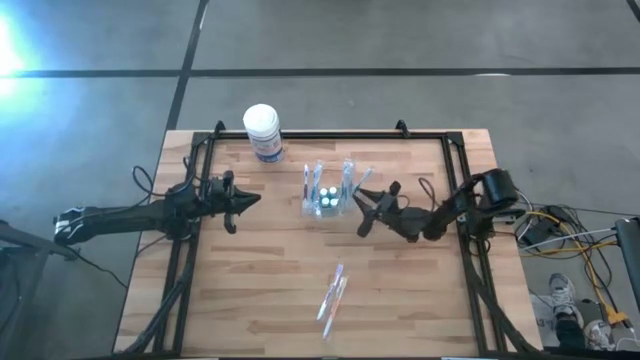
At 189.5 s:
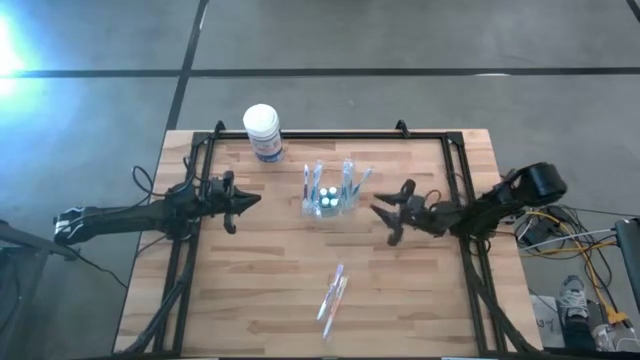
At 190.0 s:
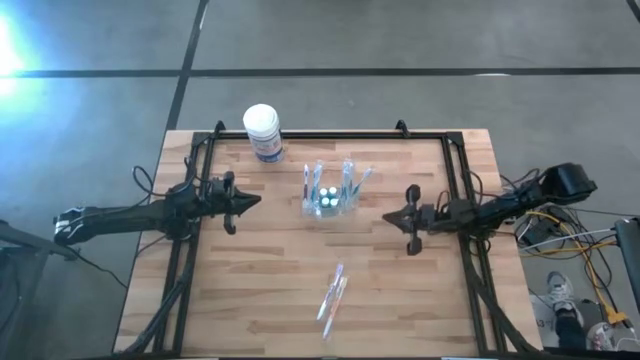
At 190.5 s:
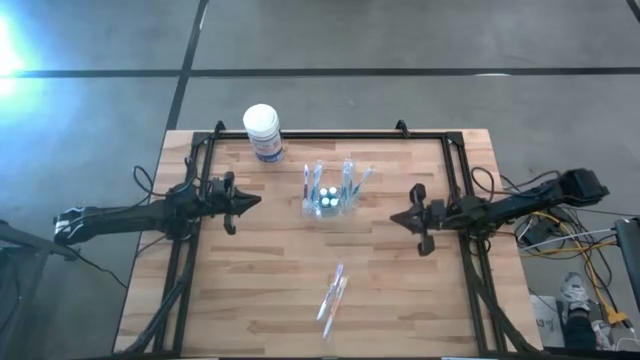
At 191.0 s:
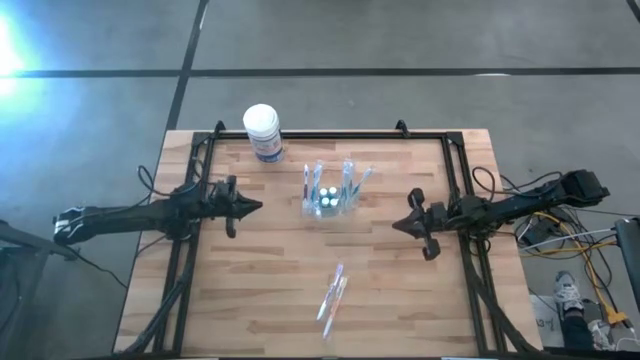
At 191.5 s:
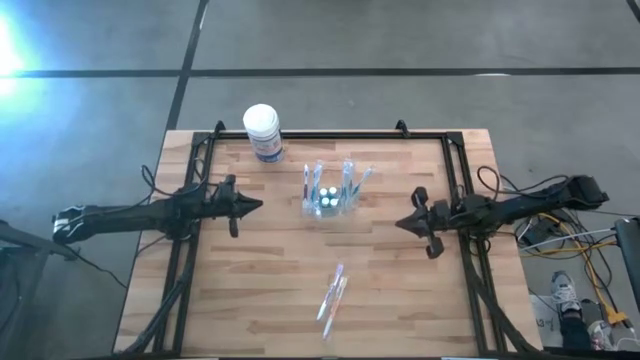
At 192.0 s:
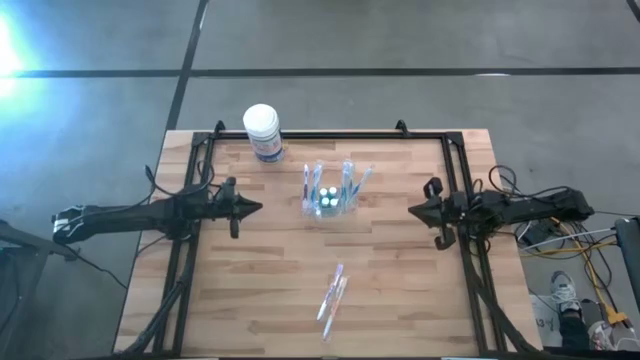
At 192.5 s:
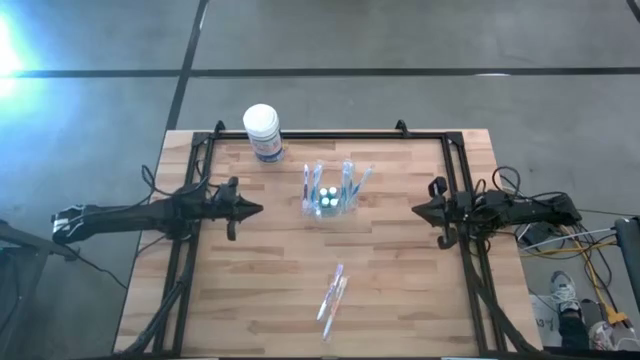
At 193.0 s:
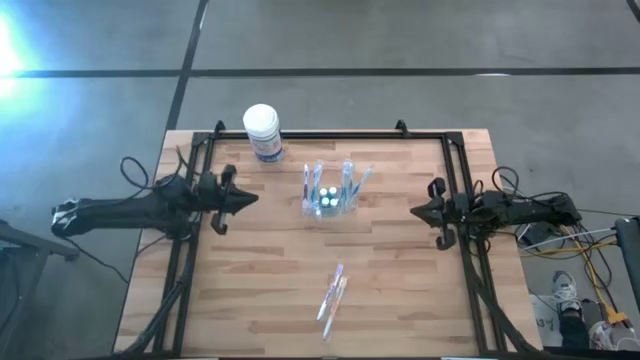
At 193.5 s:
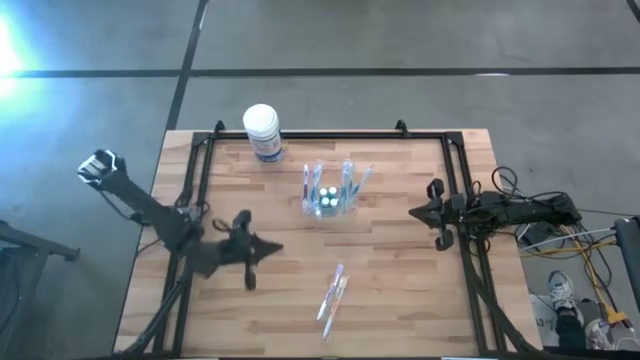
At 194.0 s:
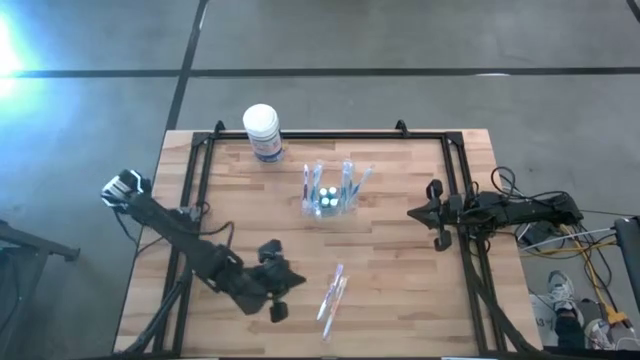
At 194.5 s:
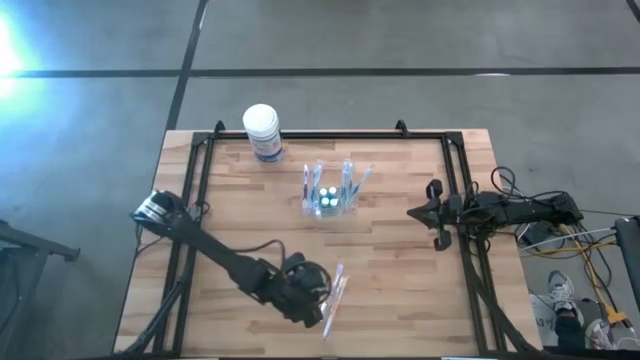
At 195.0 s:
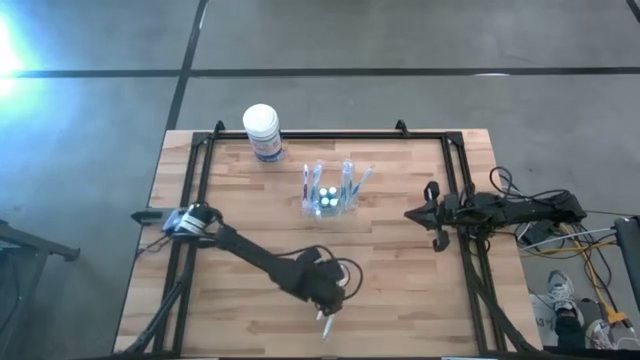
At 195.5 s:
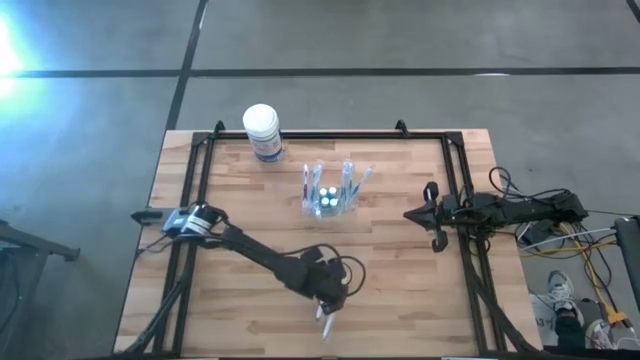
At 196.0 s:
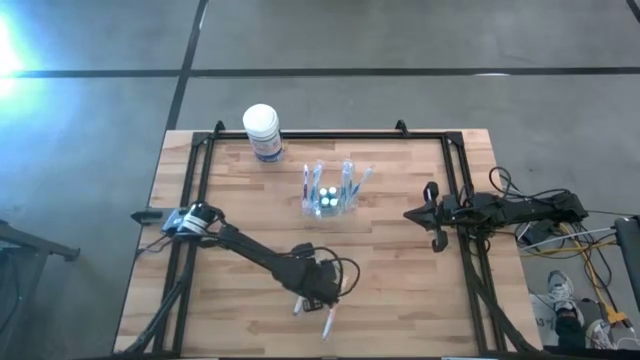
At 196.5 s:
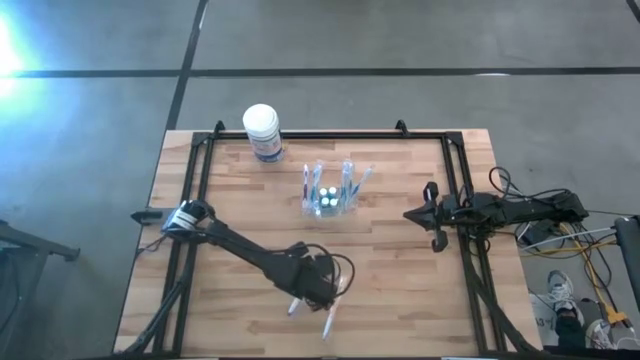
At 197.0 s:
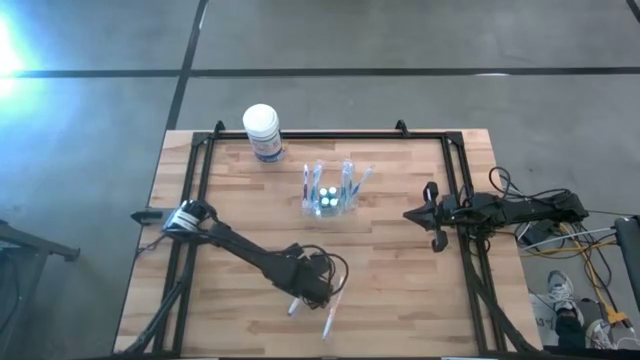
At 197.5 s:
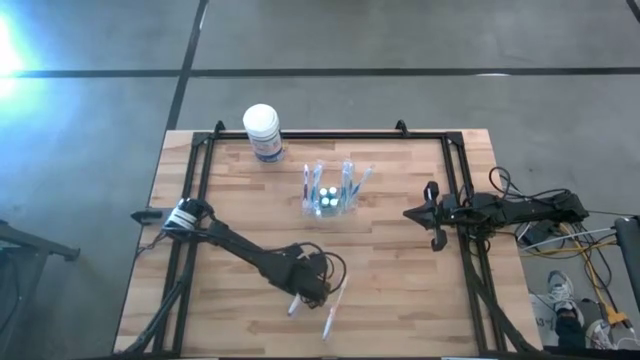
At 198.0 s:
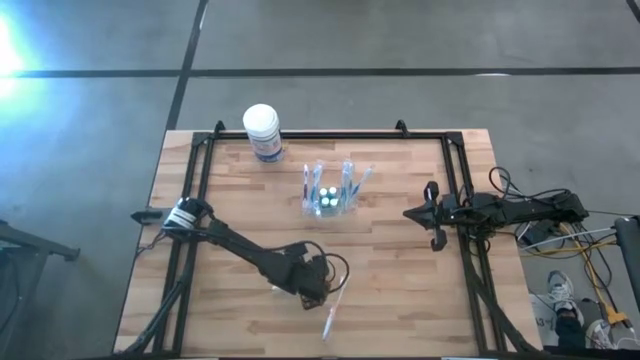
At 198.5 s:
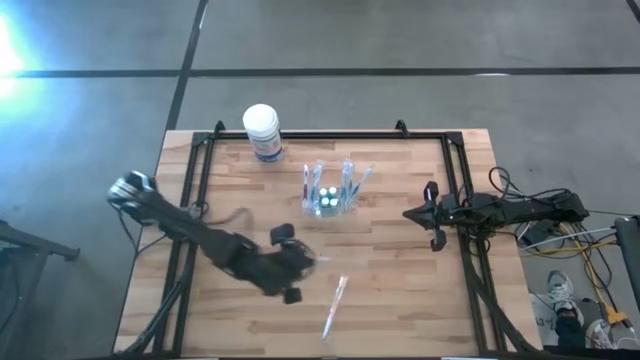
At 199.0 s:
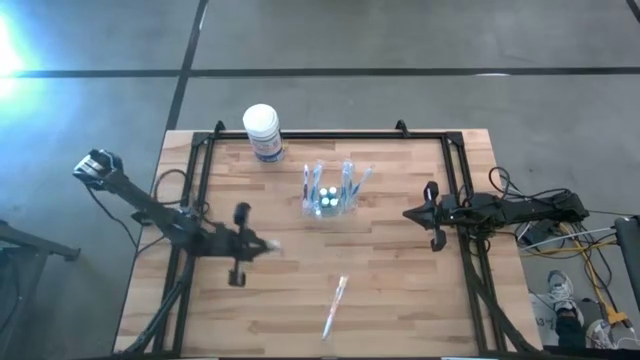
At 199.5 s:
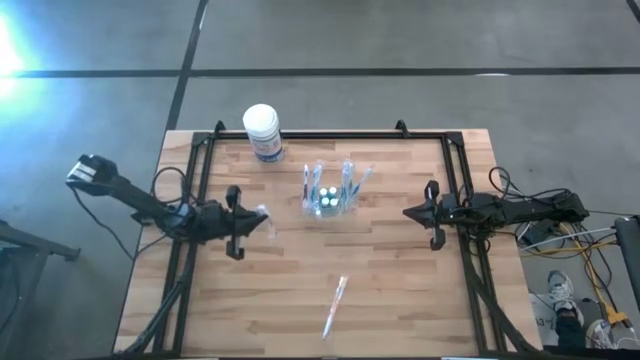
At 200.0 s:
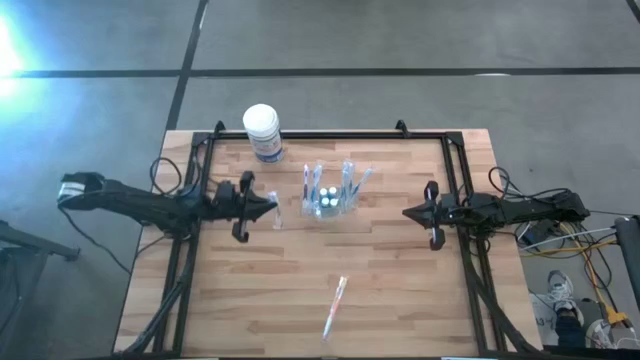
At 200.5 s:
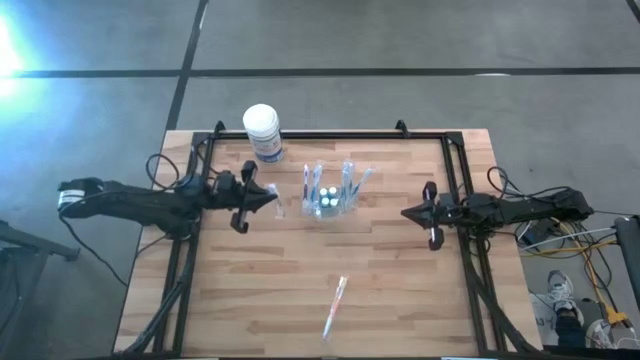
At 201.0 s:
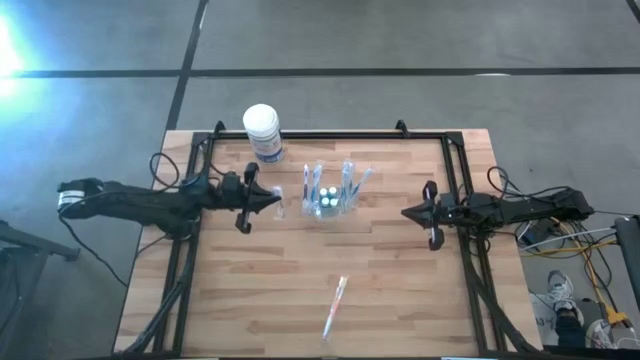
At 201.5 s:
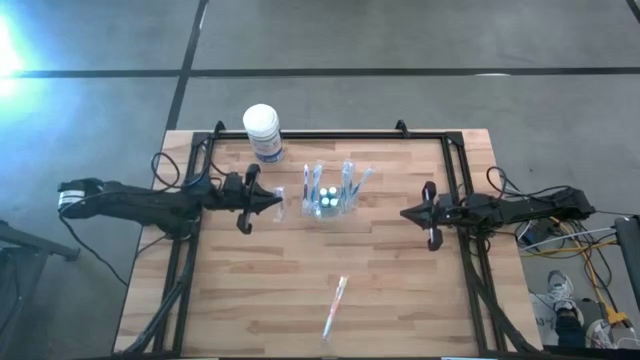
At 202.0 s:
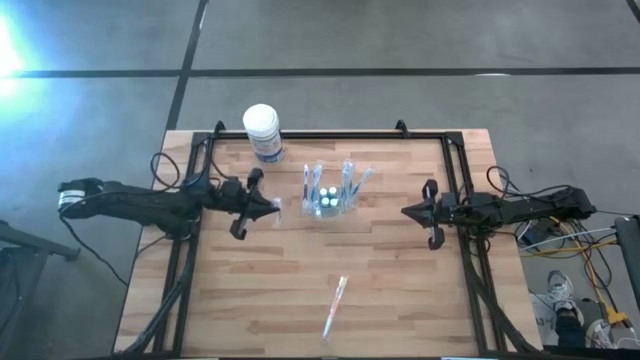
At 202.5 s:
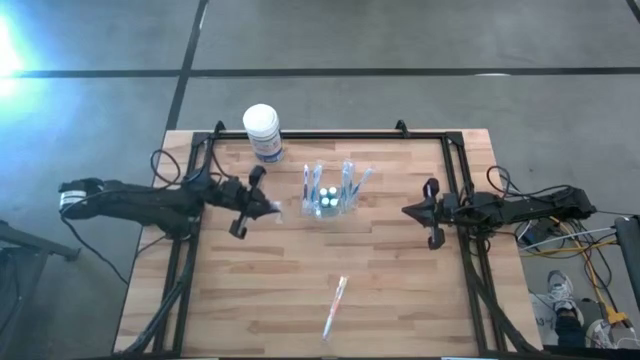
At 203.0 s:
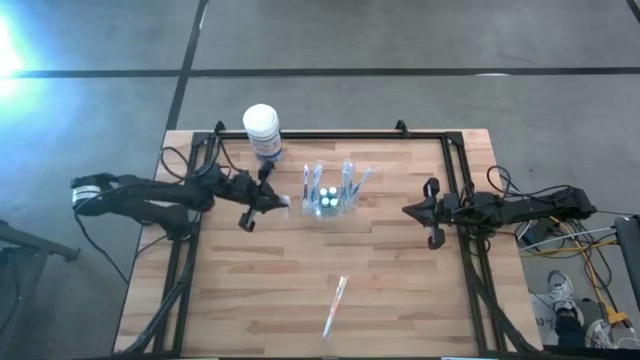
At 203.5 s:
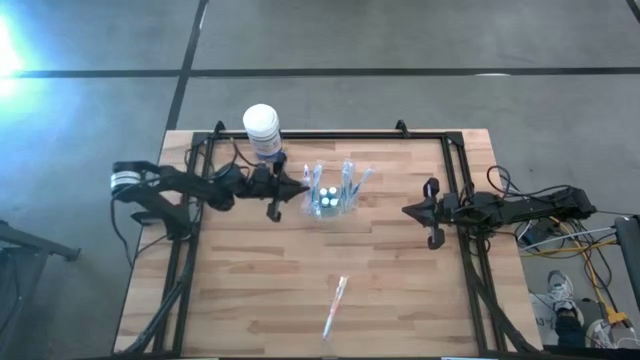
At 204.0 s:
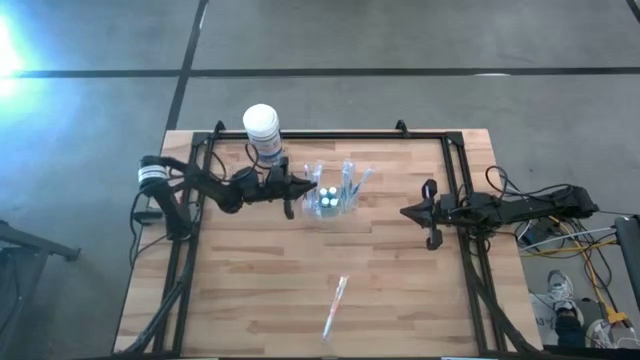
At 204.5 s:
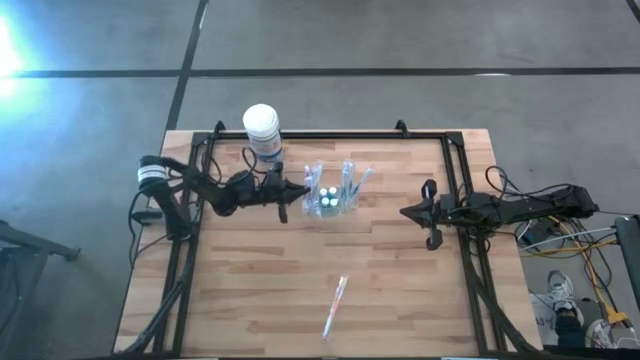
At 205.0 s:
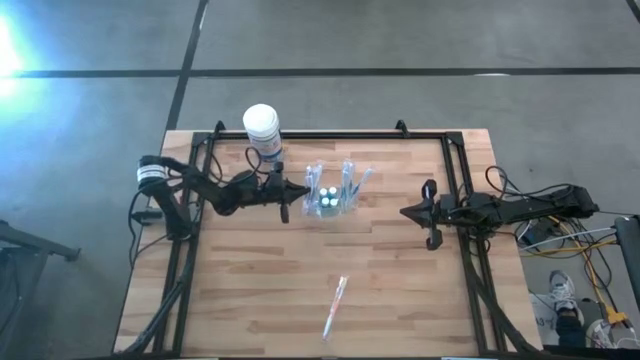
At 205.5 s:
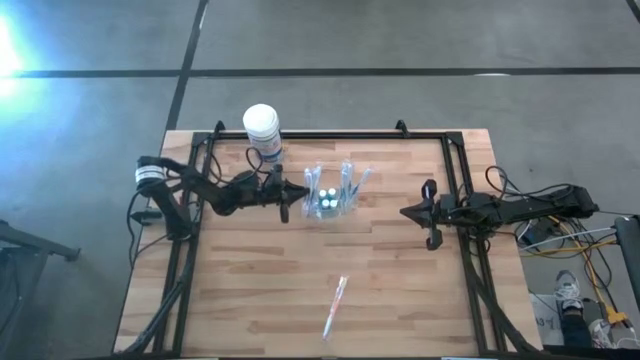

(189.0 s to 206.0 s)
Task: Pick & Place toothbrushing station
Put the violet toothbrush into the transparent bin organizer
